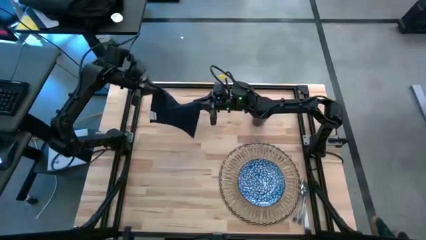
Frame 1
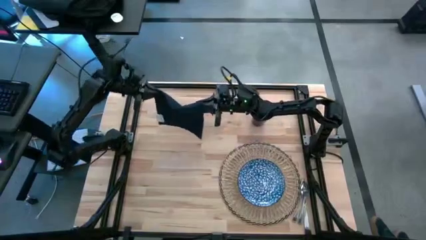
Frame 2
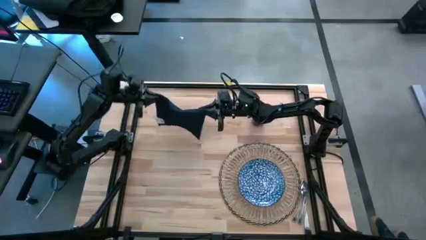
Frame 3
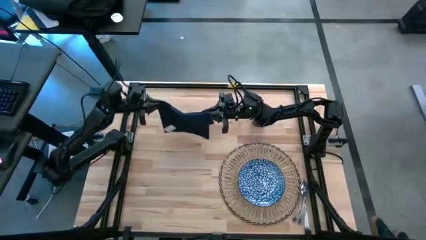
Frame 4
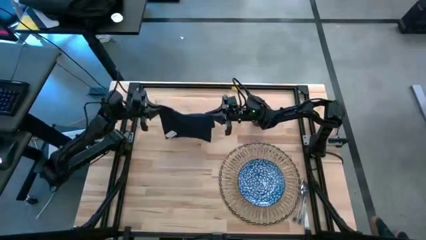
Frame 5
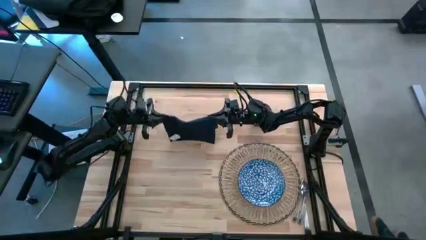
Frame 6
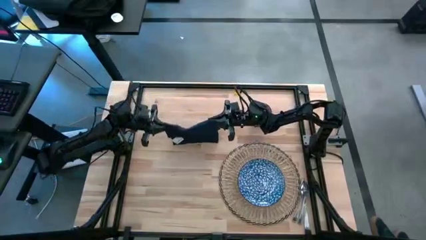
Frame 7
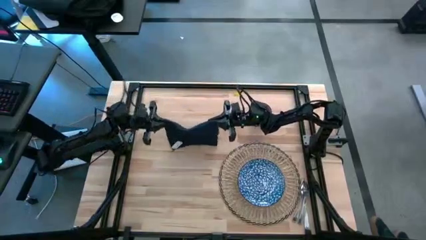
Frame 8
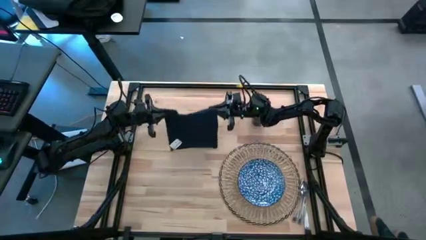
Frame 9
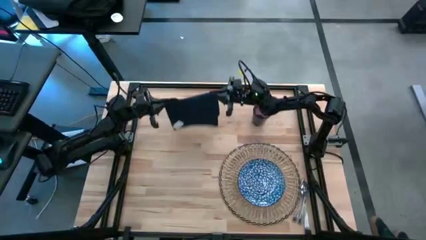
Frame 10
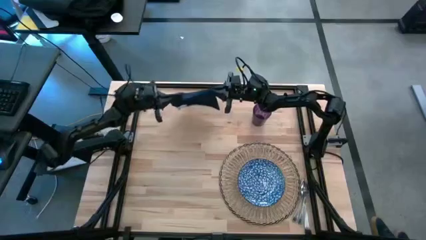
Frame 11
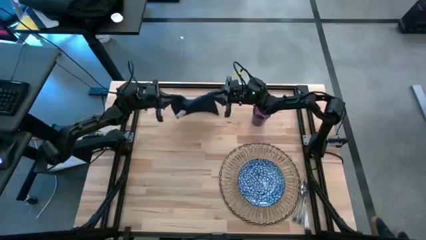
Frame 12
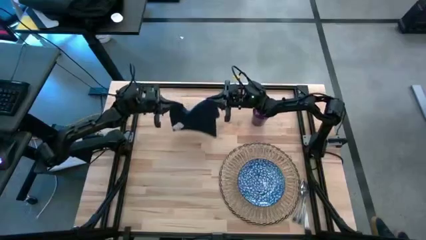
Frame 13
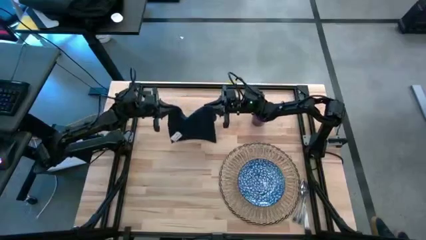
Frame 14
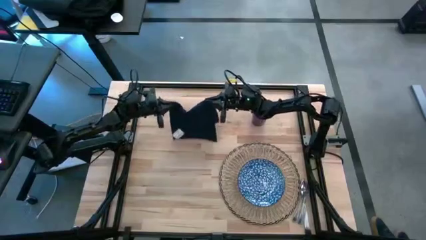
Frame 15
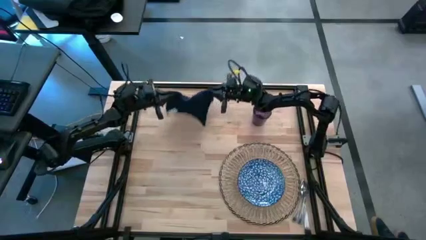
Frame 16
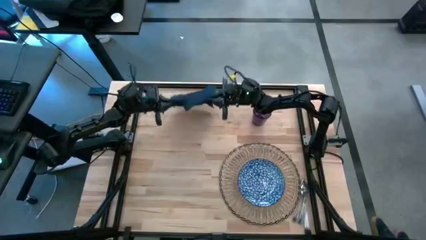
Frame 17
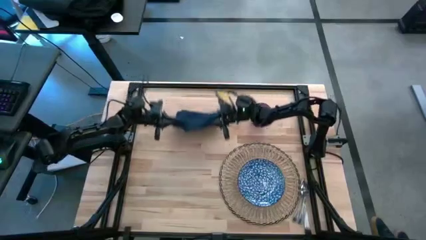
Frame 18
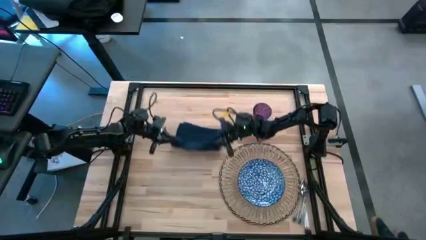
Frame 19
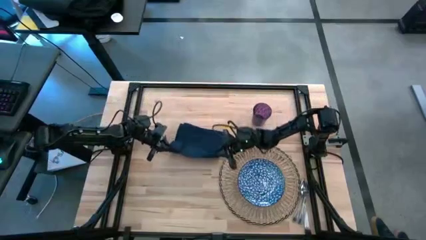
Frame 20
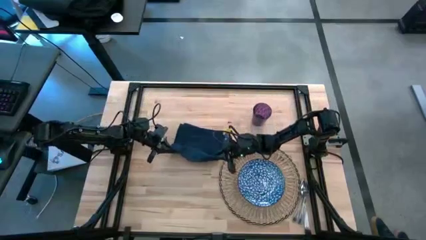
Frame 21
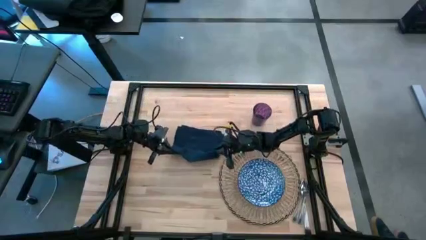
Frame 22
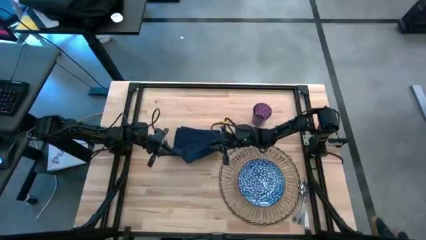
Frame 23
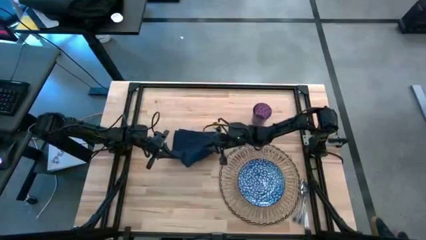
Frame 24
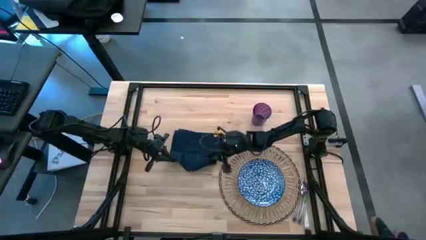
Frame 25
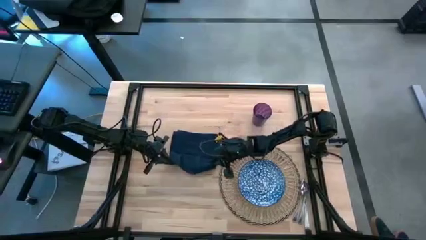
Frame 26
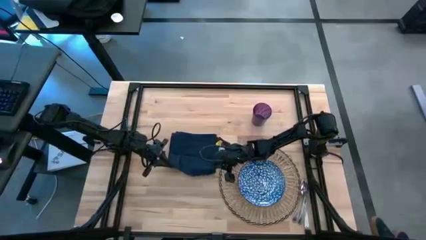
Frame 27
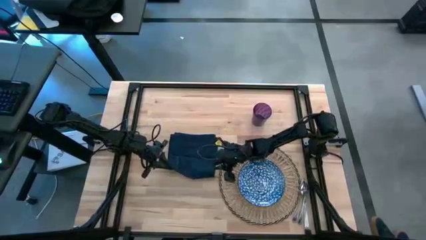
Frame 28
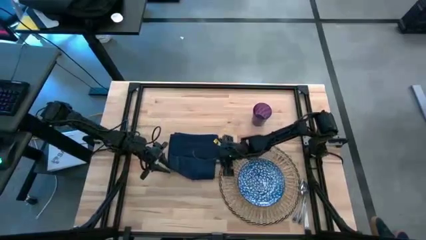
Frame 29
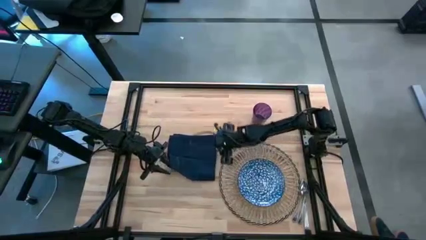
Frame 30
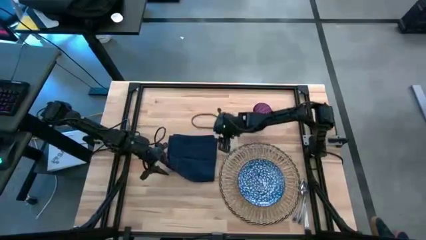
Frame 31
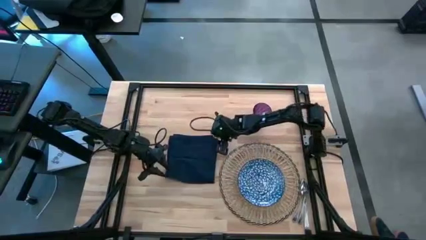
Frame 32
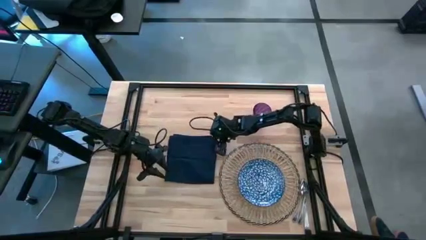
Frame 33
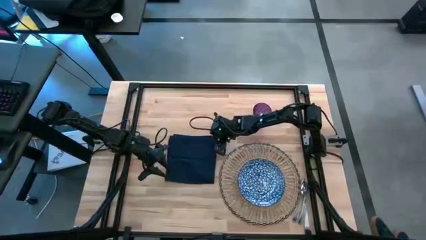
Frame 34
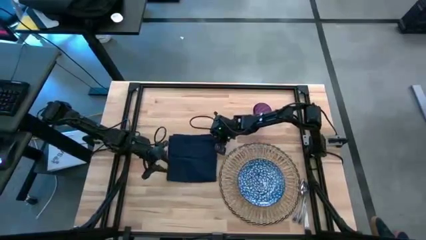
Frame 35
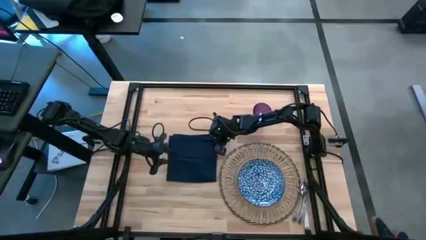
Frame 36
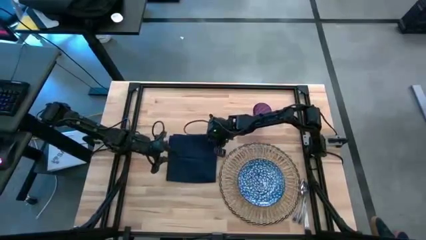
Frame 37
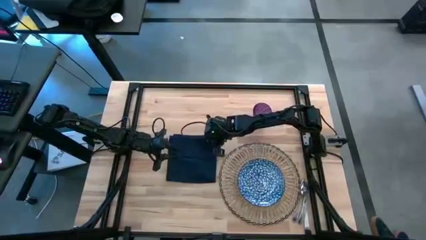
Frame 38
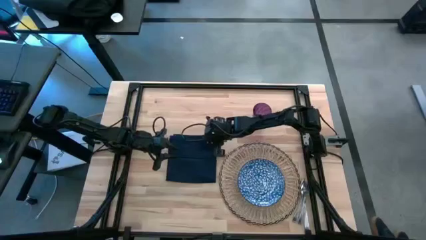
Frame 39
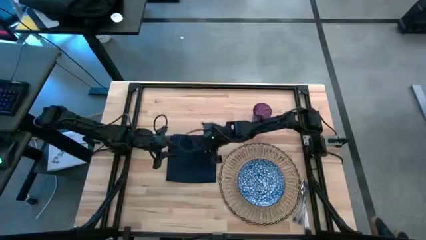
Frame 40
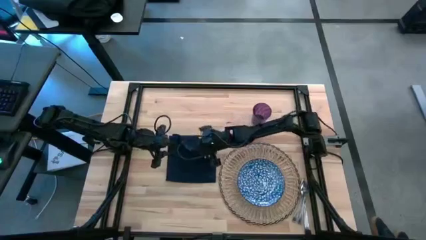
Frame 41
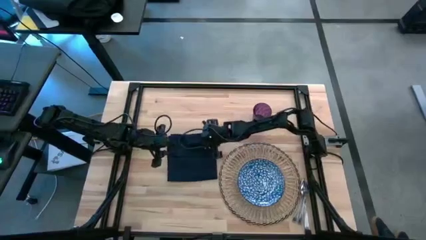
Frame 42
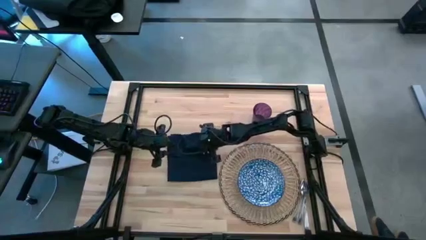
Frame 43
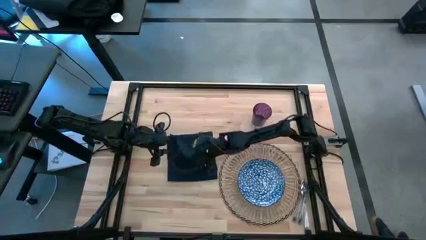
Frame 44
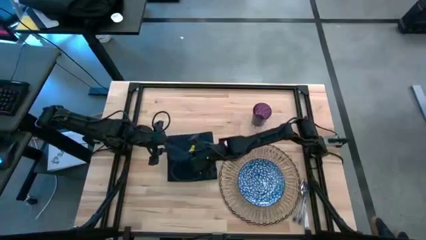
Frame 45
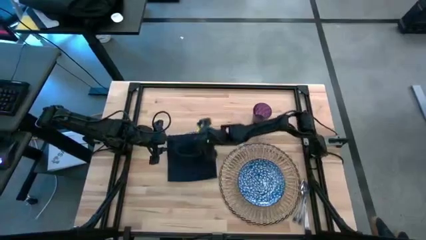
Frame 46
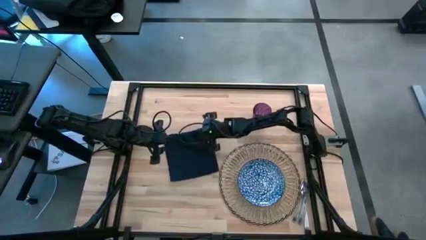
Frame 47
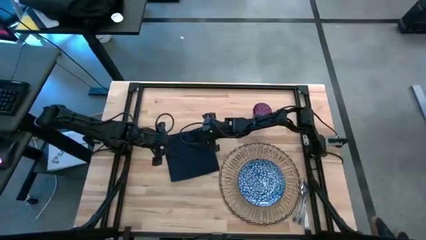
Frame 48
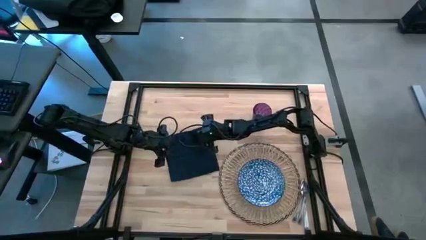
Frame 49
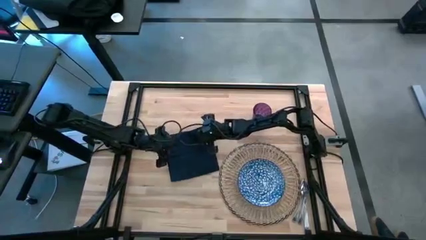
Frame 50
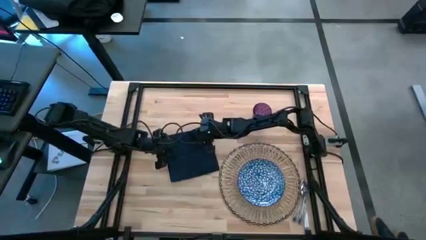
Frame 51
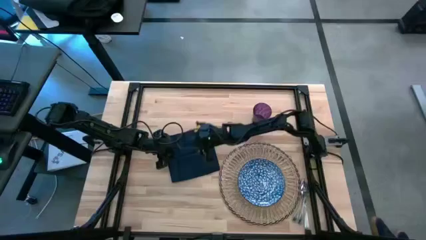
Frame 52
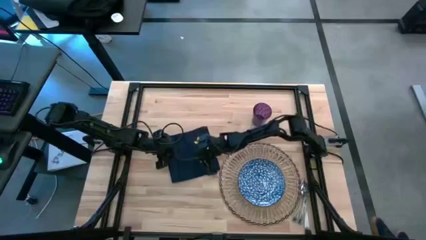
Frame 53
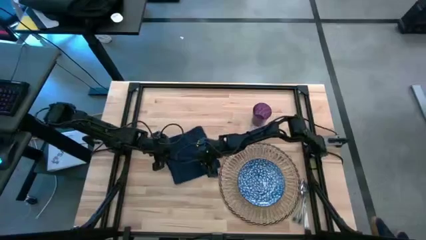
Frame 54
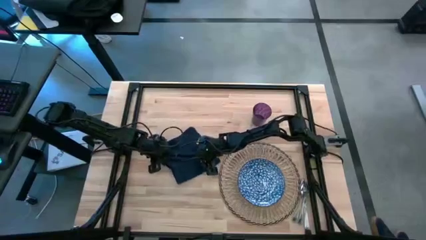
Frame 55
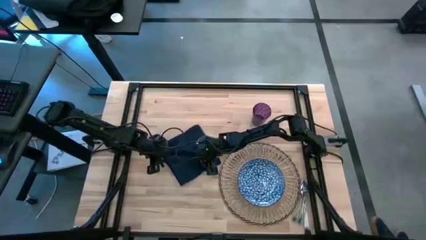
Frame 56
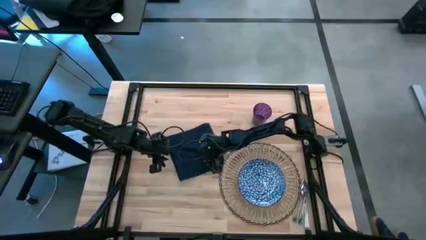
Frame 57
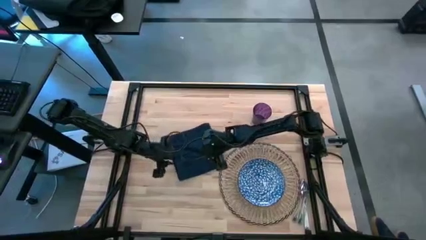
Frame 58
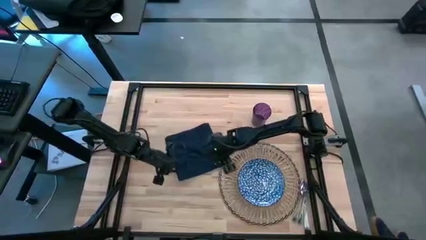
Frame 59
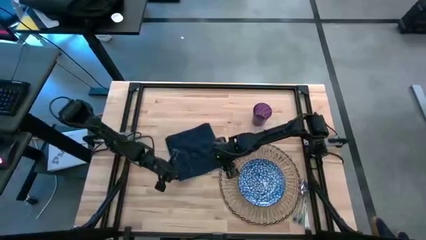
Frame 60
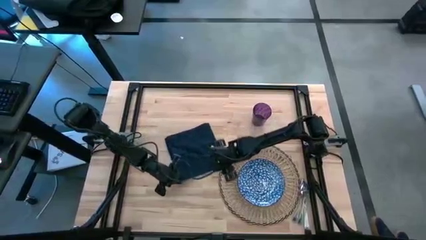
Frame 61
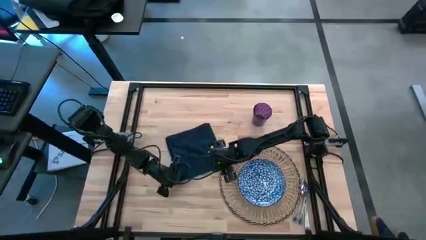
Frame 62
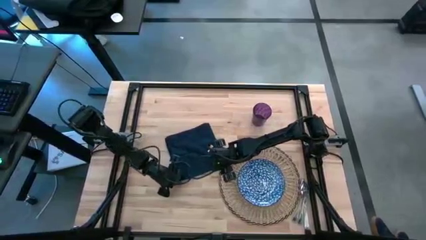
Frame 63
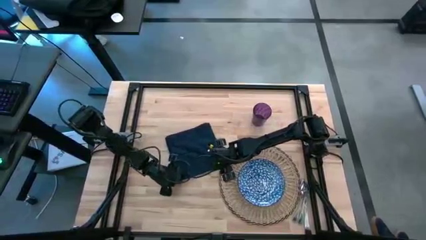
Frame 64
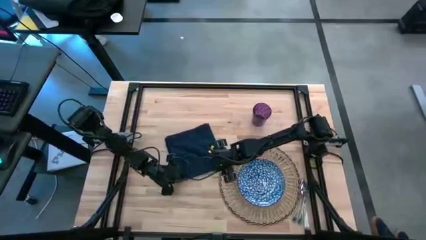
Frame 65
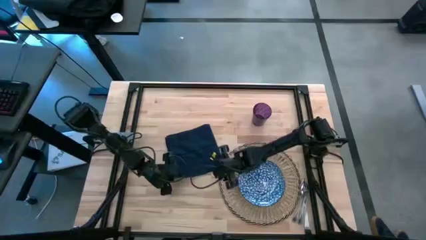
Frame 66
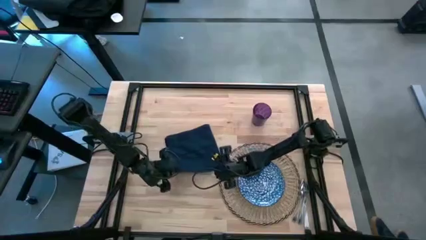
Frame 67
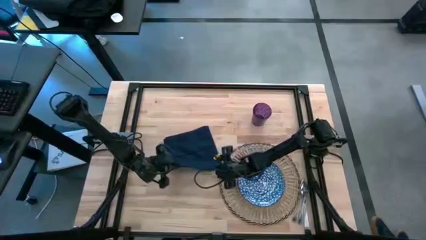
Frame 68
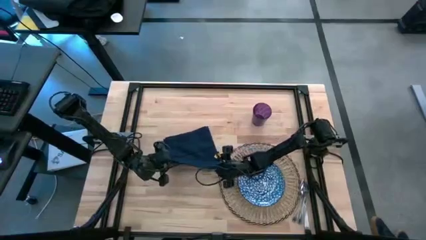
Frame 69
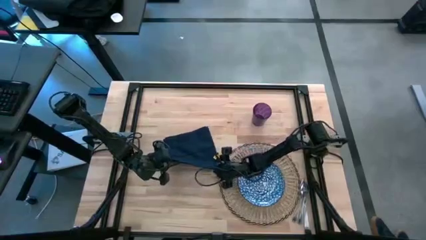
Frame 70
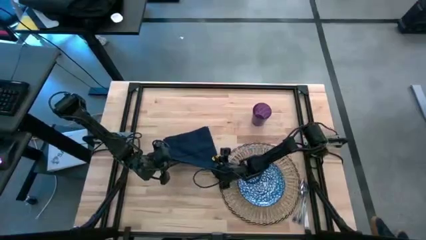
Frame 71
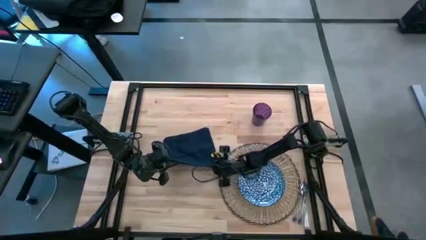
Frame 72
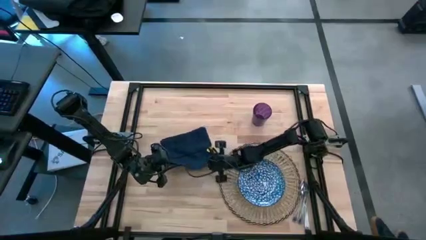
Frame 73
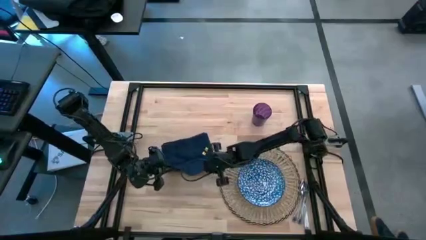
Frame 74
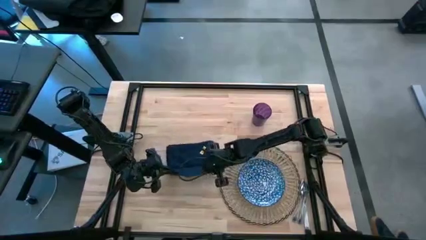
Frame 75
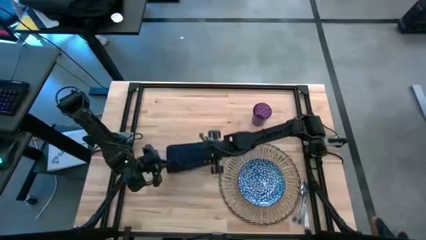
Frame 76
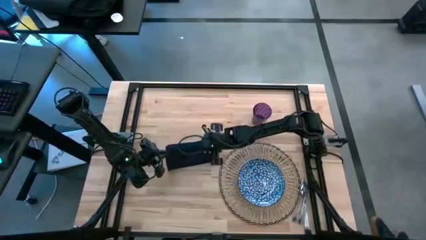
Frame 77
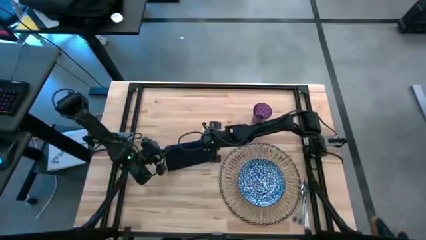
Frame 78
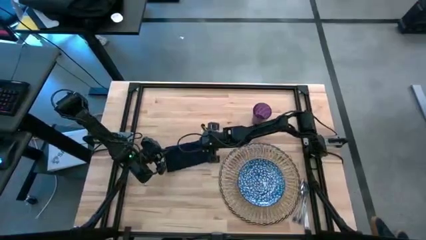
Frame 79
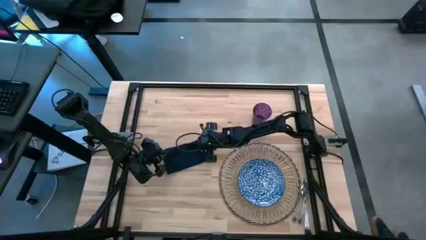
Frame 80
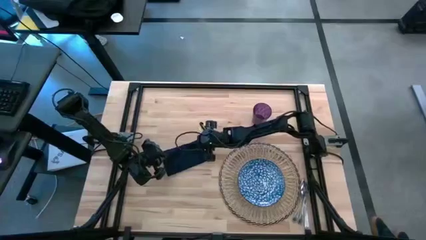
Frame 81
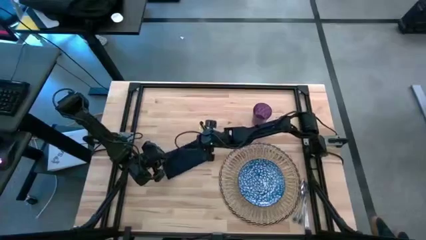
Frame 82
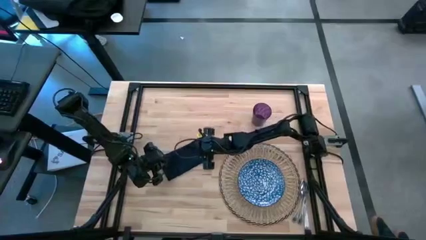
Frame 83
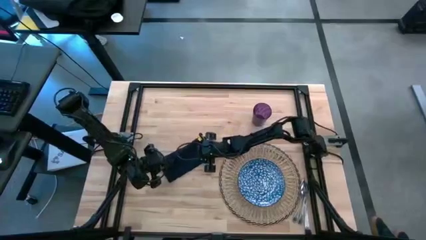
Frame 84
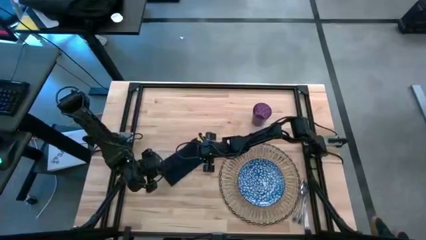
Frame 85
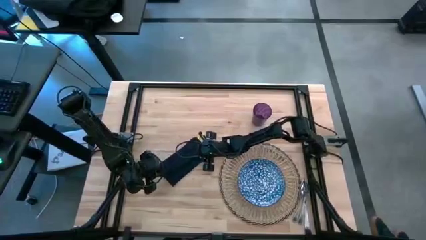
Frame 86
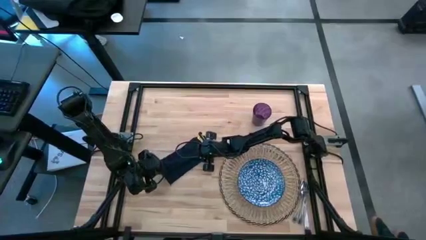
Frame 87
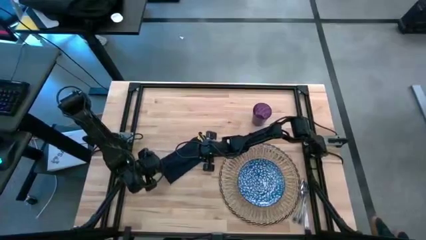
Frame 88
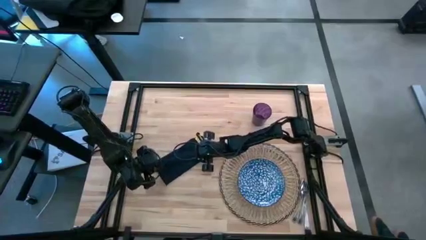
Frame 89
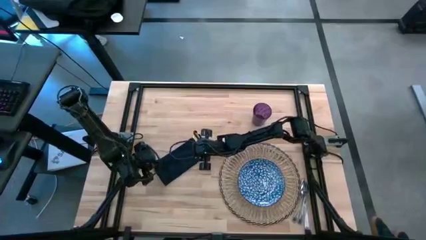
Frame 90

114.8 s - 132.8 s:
Task: Set table place
Fold the blue table napkin
